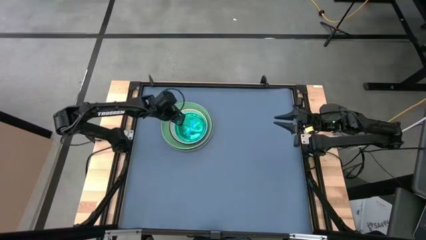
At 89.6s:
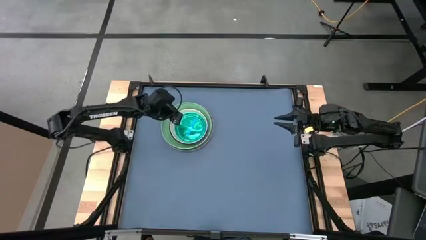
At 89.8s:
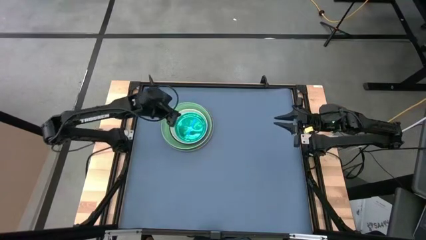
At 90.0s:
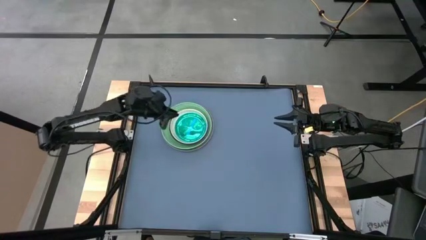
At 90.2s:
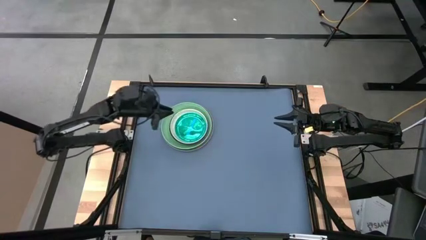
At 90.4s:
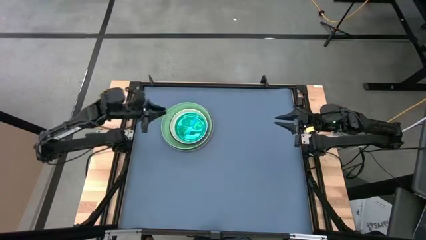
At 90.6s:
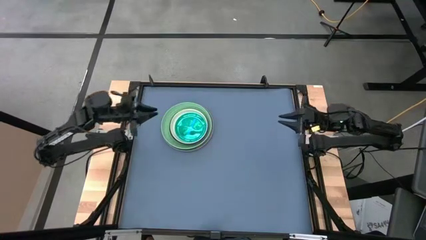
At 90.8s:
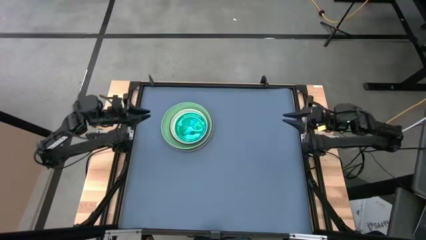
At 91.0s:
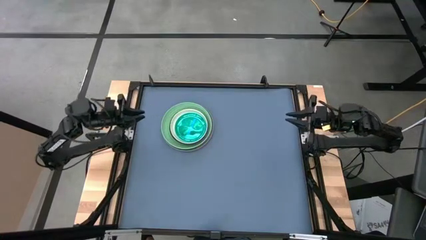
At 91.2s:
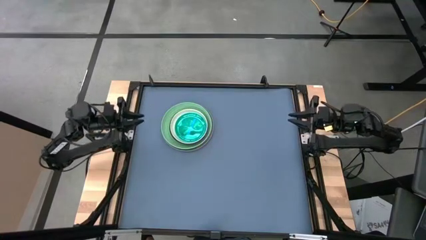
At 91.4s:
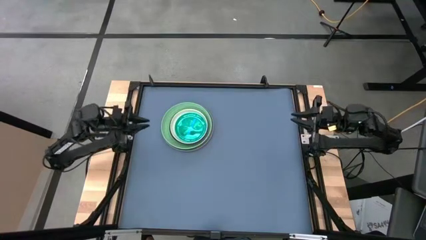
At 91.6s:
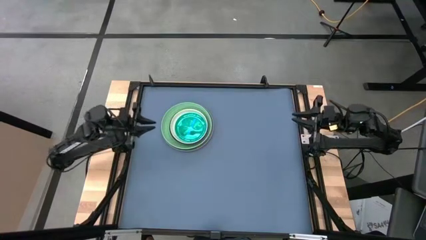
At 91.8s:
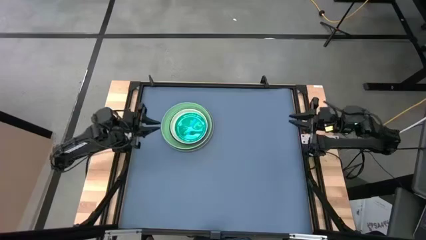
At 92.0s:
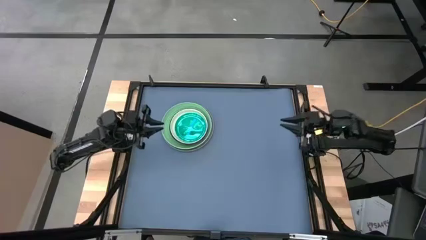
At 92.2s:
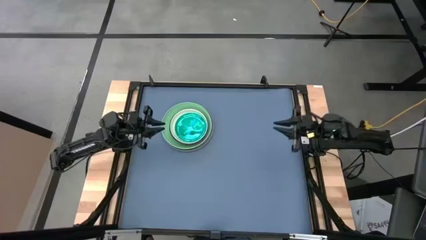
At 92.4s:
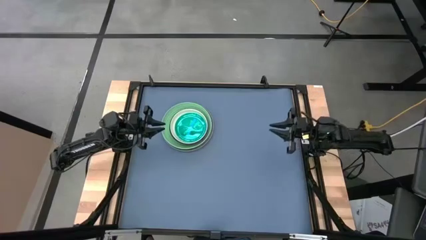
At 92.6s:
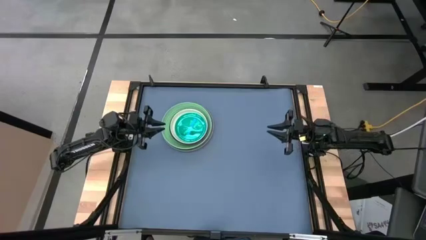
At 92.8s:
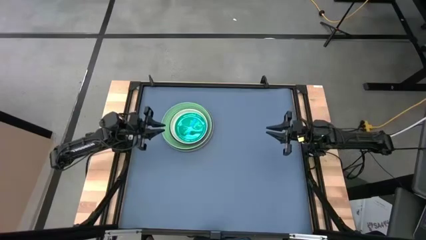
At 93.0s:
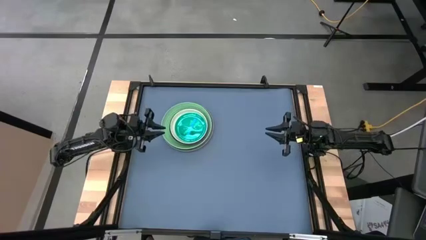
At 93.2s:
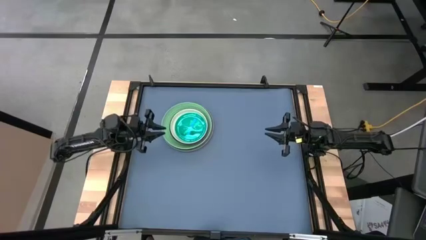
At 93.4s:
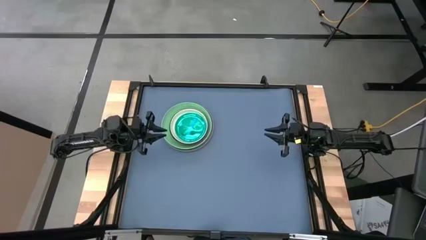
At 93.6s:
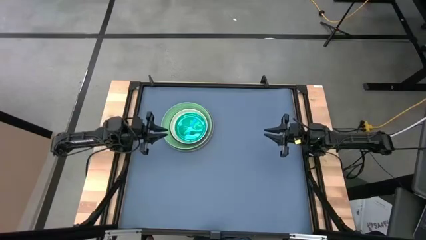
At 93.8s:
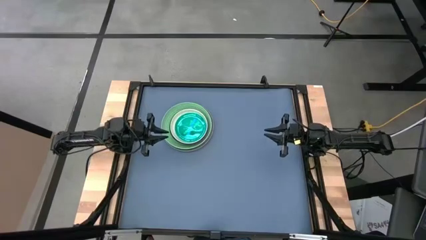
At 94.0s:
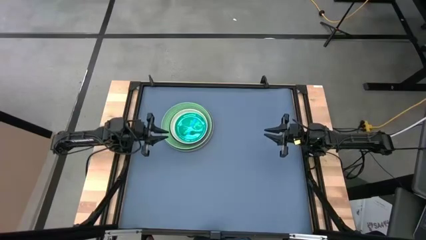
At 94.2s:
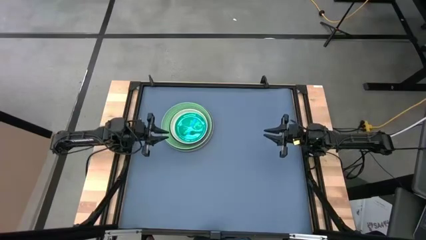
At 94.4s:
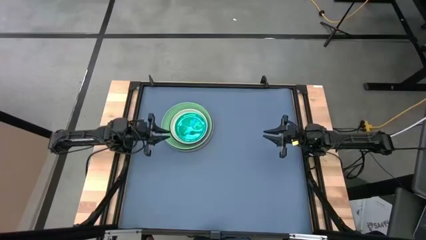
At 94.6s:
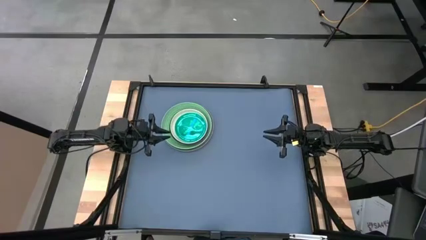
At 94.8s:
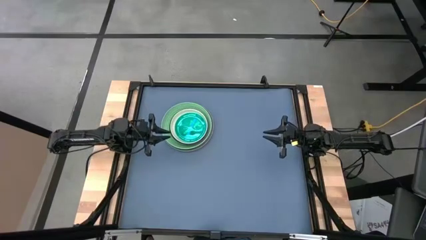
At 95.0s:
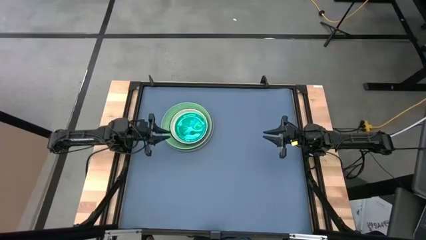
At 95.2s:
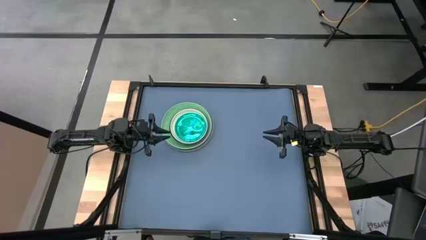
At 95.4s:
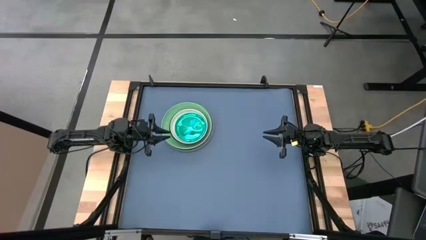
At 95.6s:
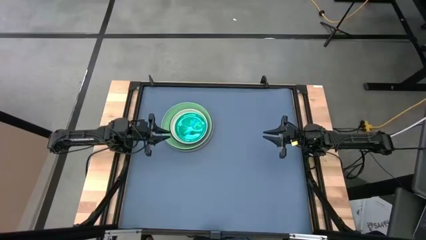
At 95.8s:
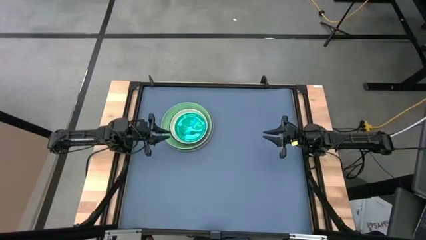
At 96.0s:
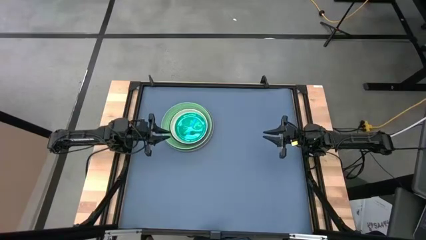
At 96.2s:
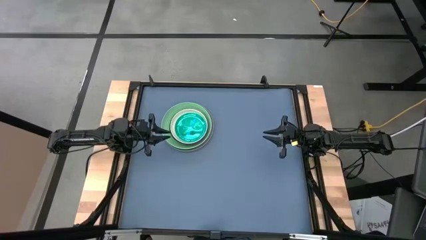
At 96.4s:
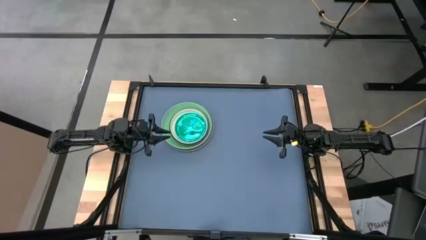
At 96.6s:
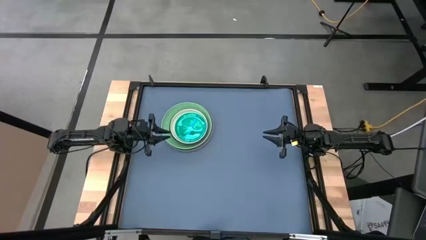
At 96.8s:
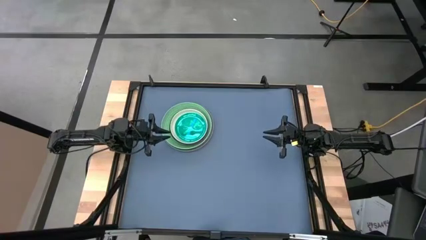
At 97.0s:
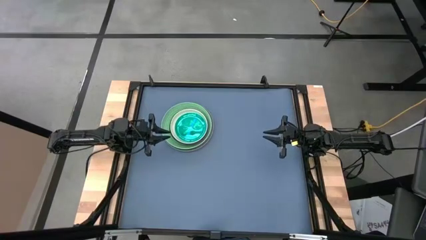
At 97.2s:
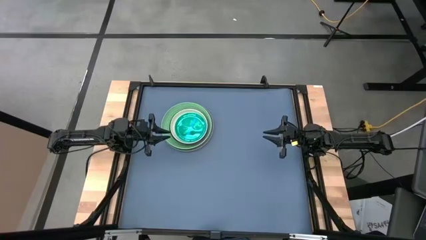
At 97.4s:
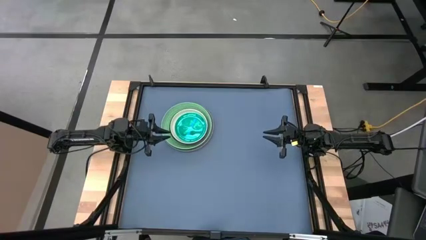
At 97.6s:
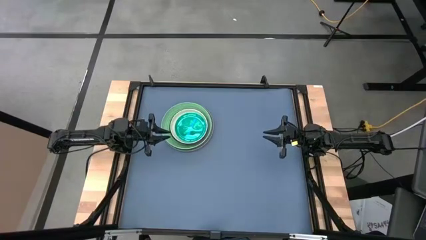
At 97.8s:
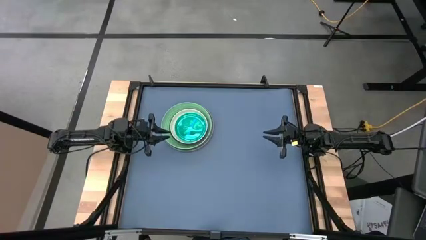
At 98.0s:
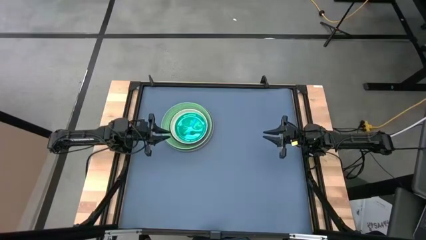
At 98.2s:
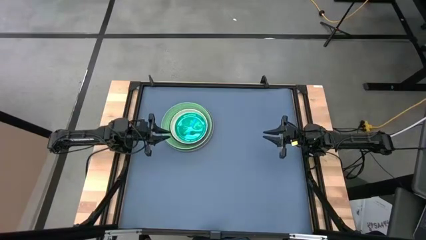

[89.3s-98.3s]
Task: Stack plastic plates
Return to Home Position

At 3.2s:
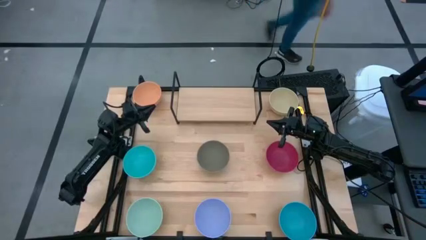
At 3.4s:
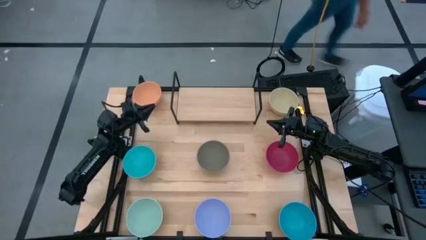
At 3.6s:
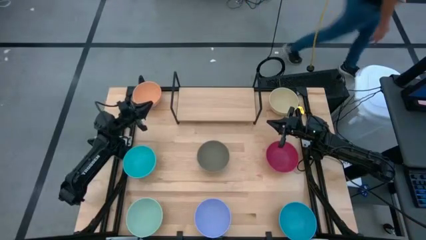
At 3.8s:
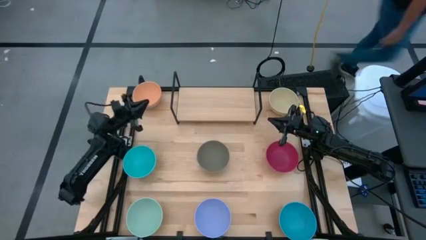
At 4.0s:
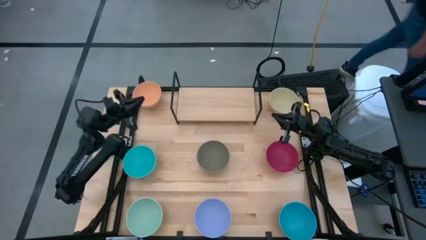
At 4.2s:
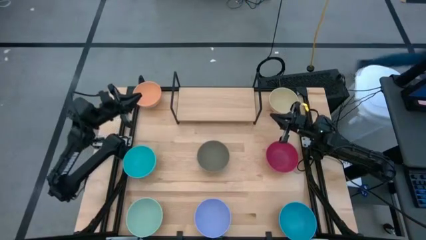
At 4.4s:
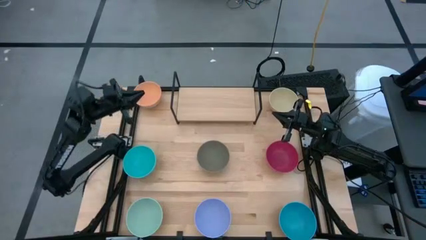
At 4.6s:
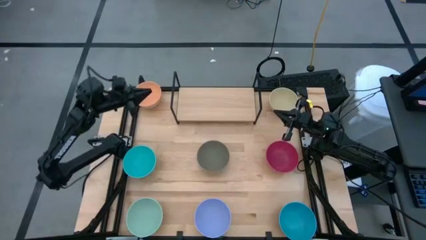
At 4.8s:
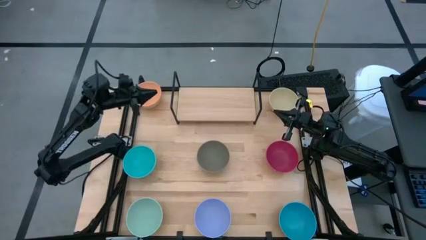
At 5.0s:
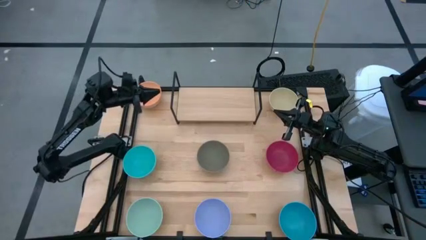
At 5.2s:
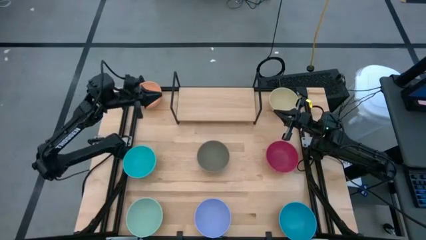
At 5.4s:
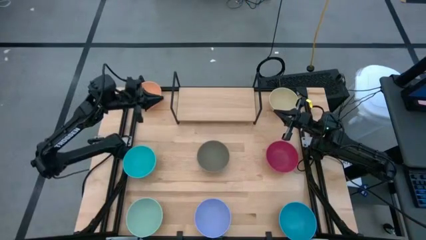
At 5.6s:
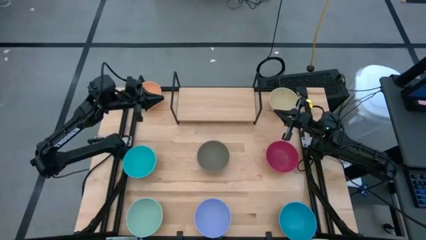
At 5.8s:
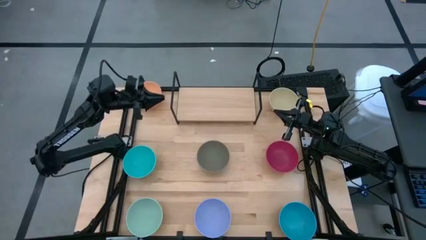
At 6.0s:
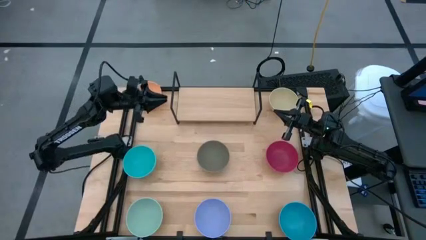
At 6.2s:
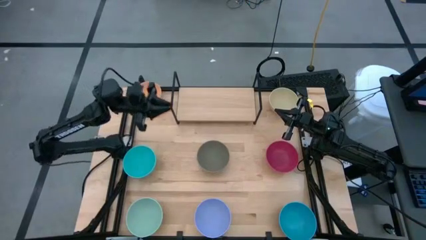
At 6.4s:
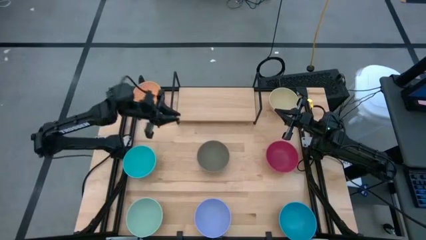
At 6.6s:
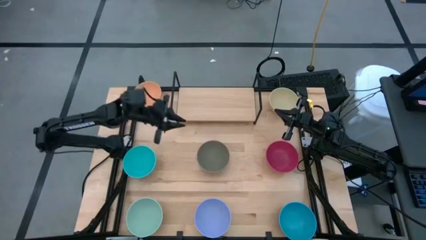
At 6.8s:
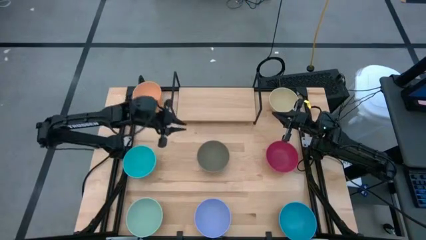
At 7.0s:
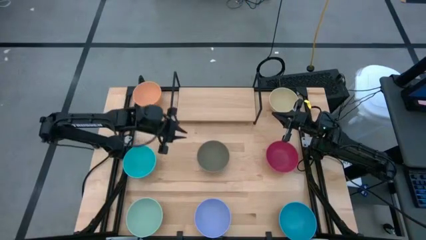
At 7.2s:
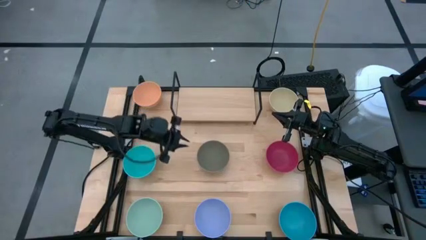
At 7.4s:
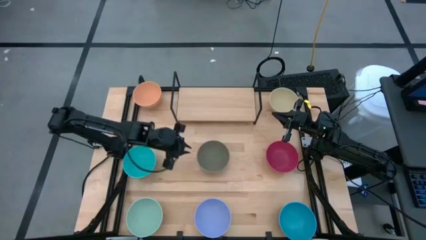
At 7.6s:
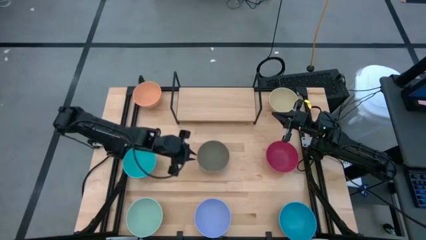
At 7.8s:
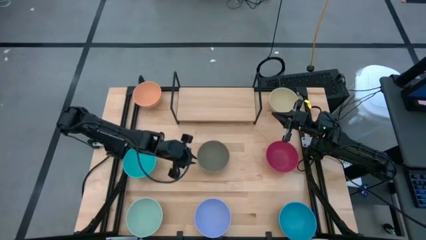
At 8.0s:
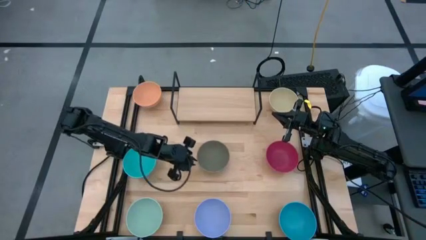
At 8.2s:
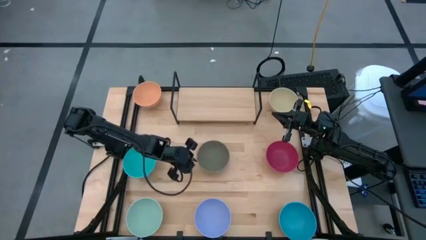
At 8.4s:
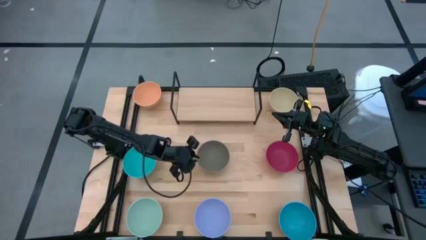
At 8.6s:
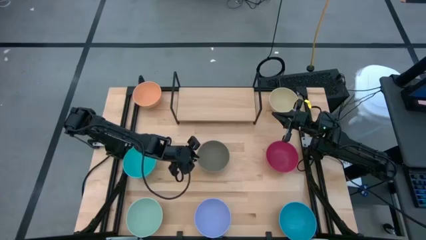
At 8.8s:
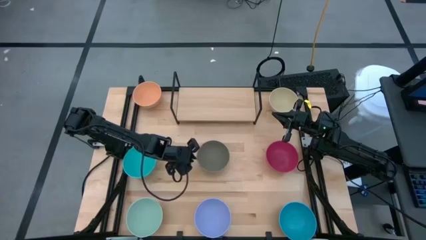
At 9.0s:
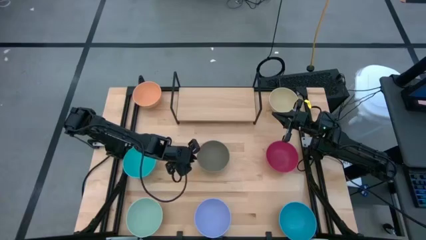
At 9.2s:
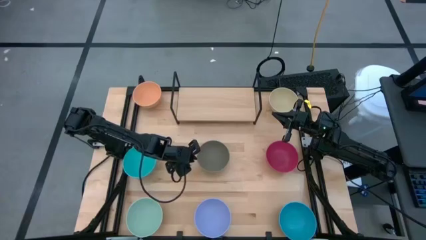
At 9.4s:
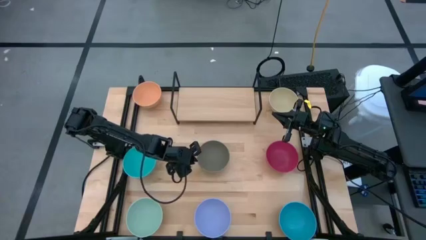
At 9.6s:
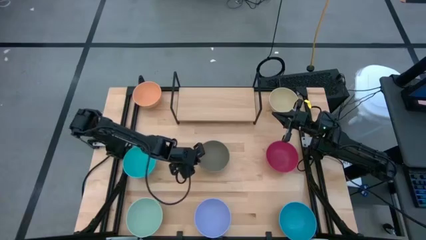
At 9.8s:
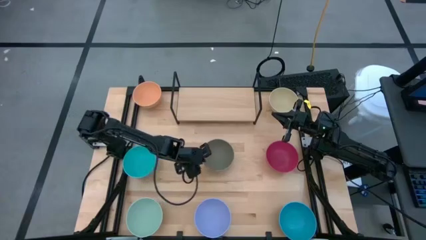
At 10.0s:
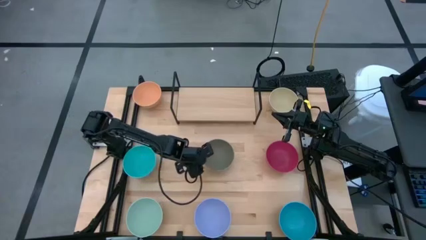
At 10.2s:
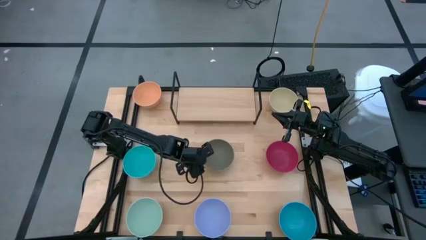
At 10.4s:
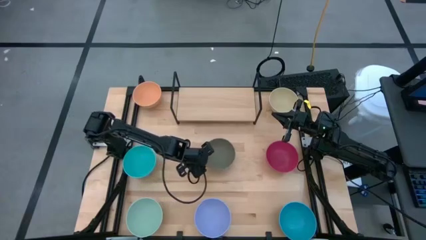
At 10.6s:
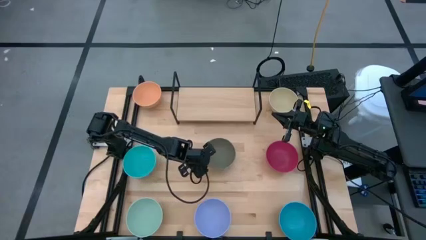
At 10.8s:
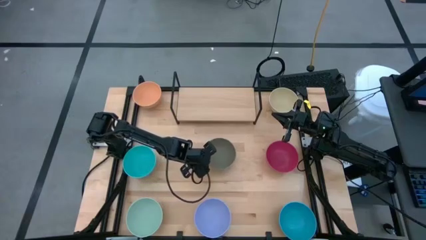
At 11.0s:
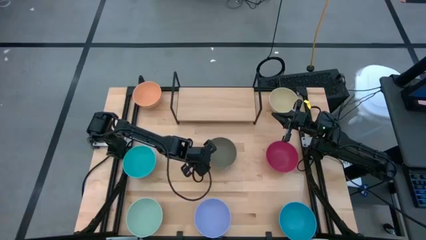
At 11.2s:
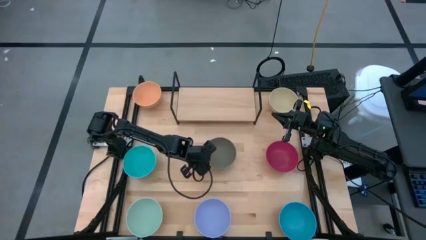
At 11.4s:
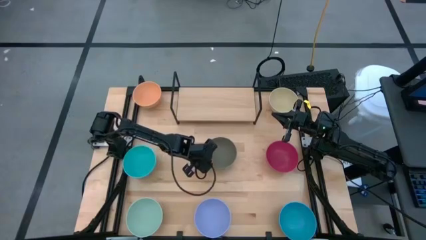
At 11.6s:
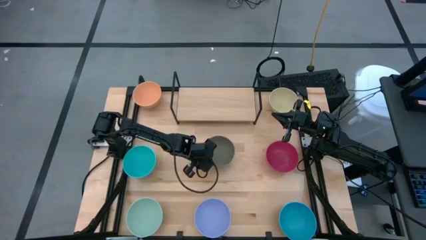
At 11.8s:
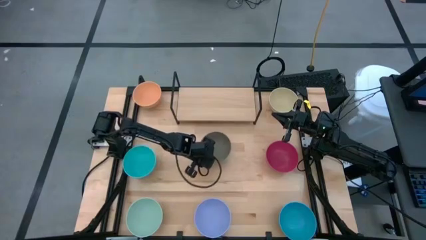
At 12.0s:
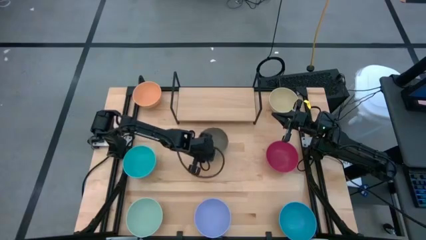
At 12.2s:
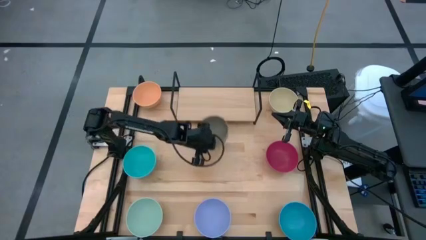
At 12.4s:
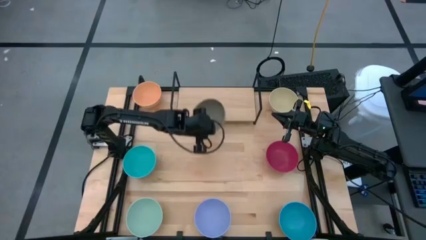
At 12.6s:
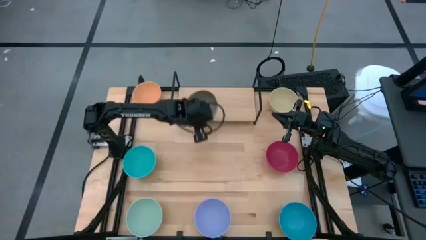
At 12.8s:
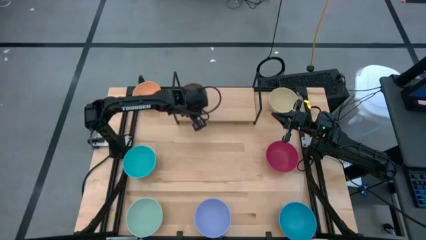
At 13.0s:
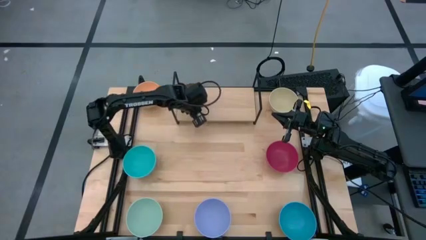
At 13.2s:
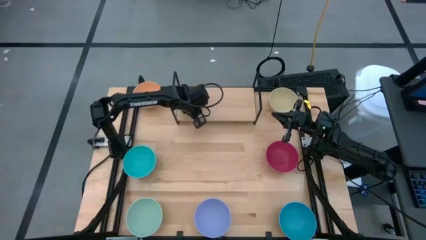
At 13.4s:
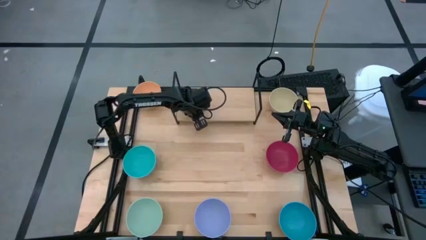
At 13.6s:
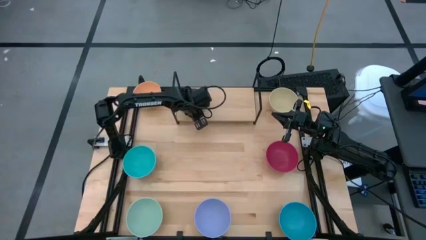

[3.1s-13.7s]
Task: Place and stack bowls onto a shelf
Put the gray bowl on the shelf
